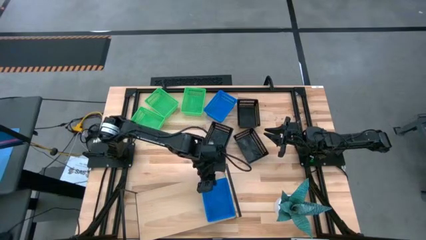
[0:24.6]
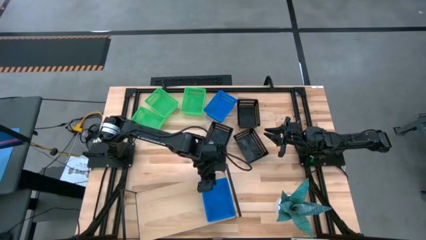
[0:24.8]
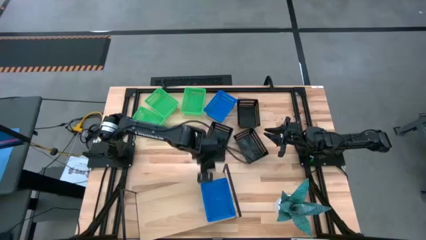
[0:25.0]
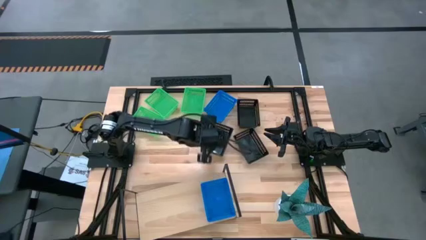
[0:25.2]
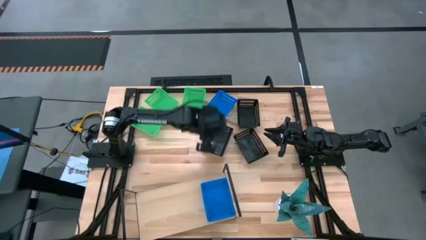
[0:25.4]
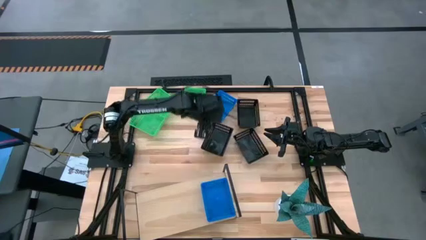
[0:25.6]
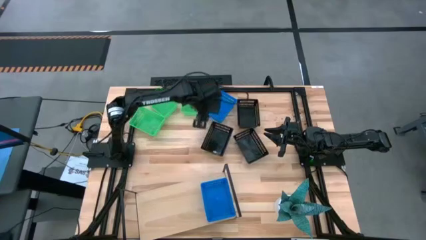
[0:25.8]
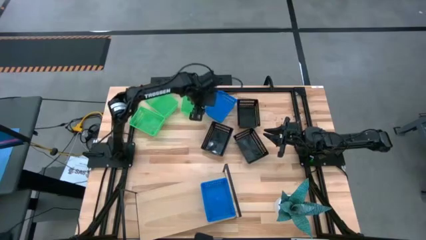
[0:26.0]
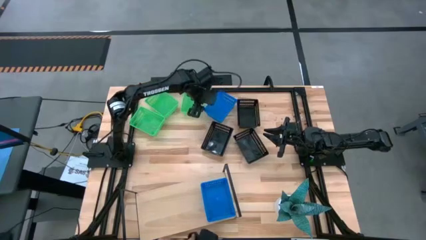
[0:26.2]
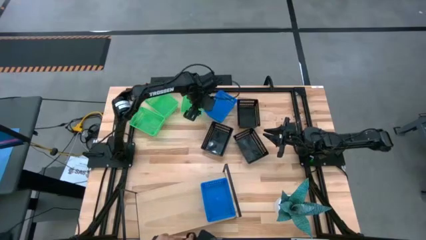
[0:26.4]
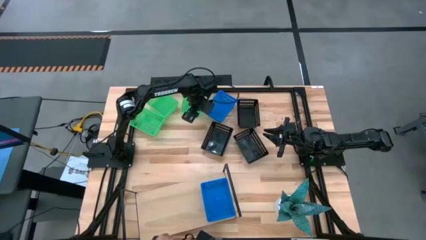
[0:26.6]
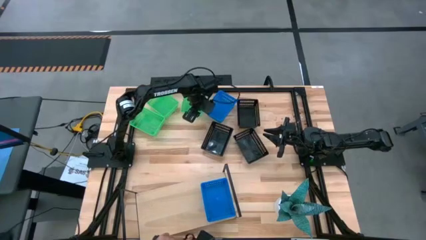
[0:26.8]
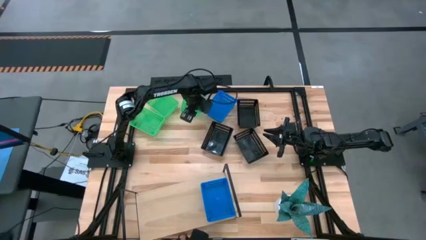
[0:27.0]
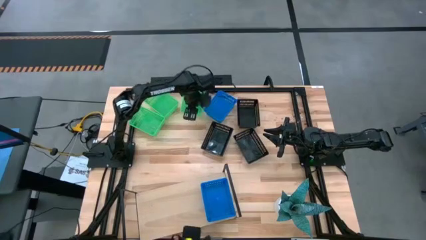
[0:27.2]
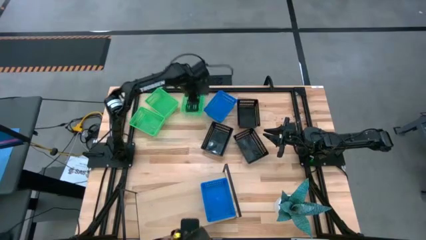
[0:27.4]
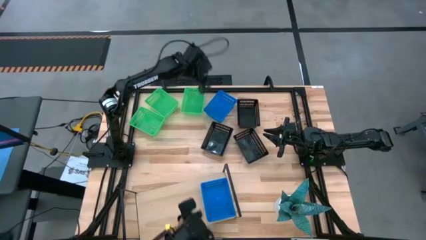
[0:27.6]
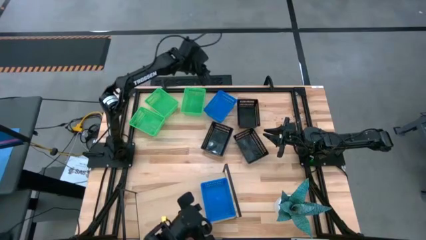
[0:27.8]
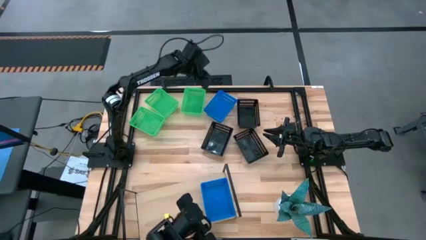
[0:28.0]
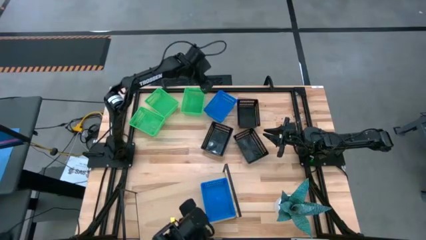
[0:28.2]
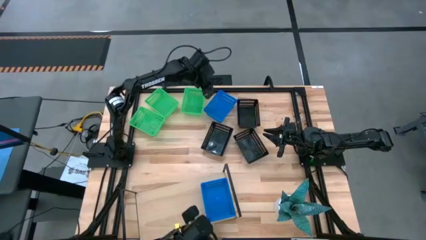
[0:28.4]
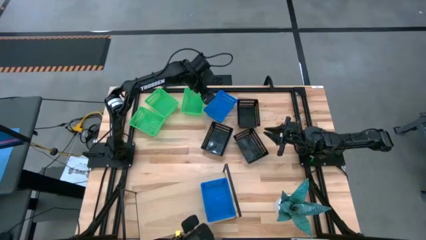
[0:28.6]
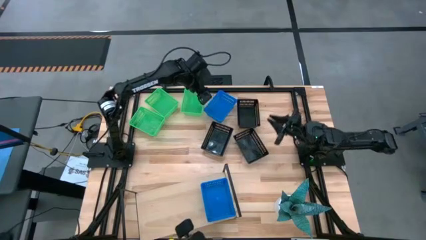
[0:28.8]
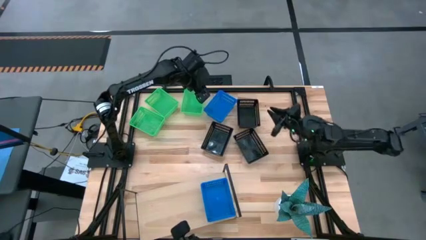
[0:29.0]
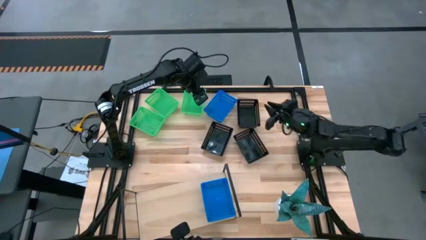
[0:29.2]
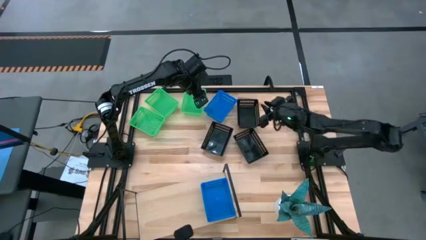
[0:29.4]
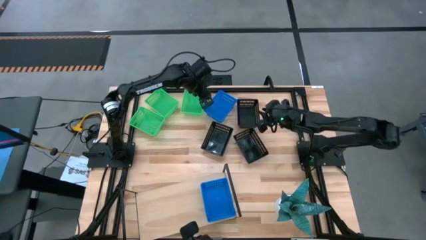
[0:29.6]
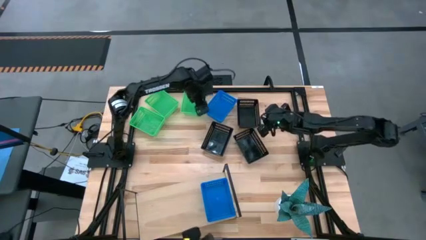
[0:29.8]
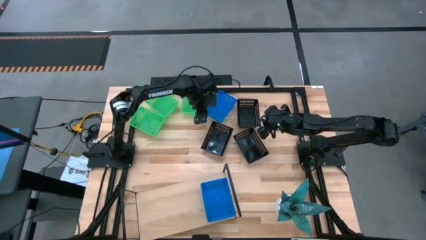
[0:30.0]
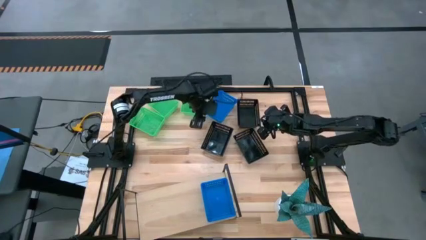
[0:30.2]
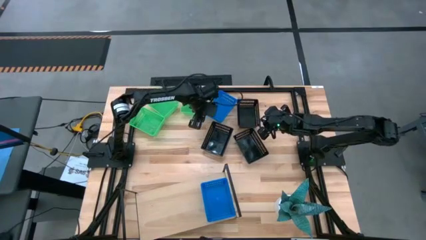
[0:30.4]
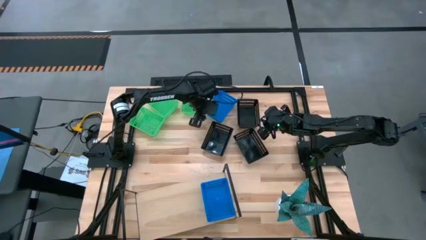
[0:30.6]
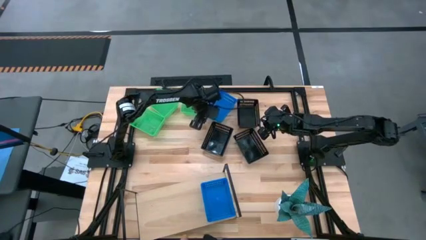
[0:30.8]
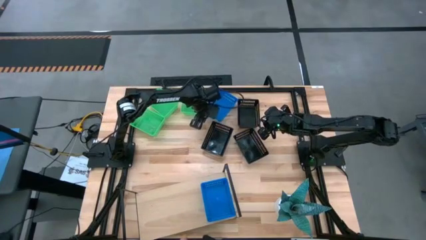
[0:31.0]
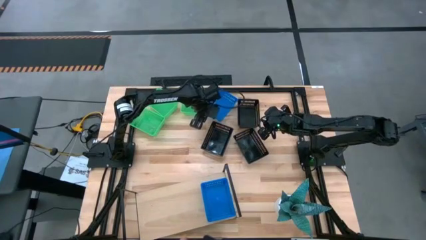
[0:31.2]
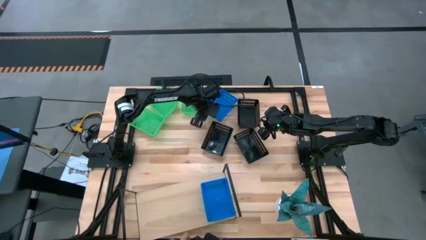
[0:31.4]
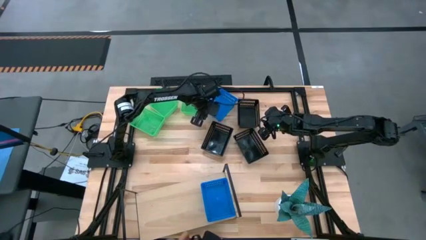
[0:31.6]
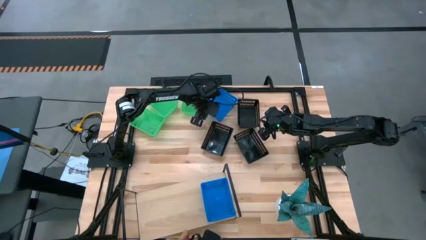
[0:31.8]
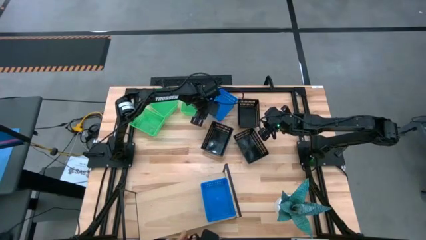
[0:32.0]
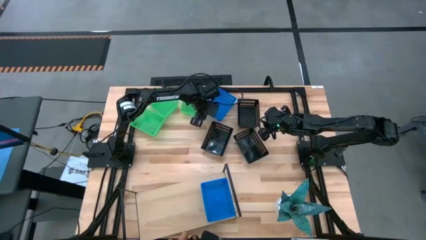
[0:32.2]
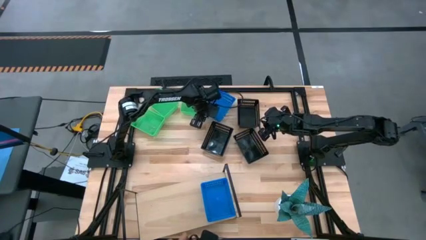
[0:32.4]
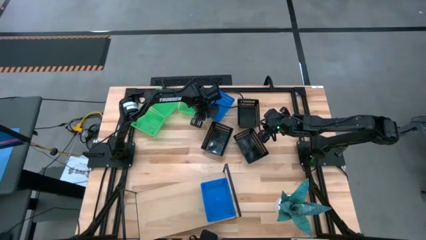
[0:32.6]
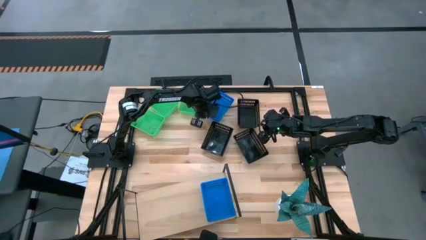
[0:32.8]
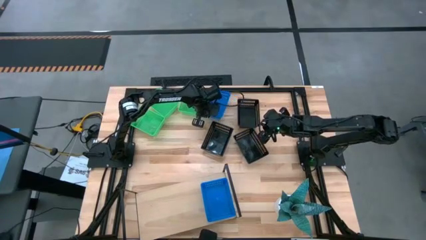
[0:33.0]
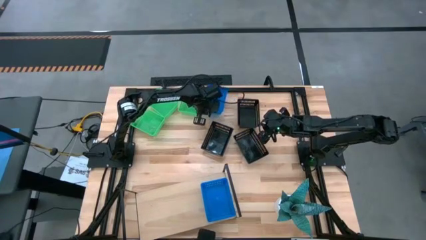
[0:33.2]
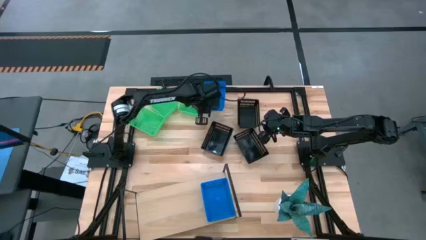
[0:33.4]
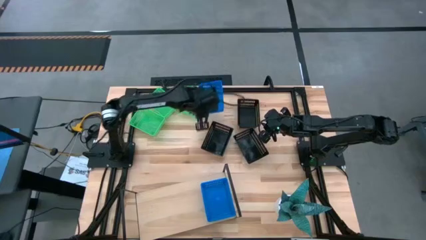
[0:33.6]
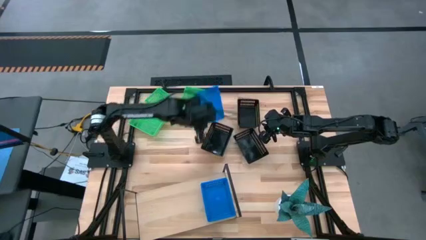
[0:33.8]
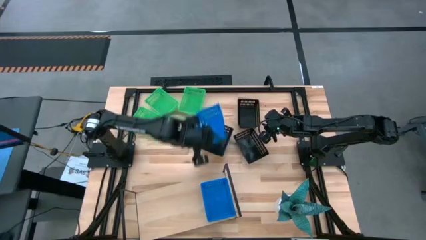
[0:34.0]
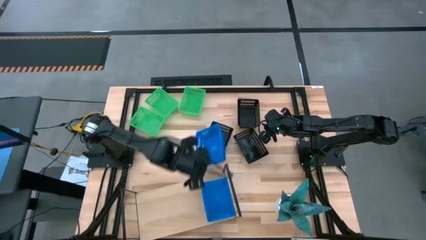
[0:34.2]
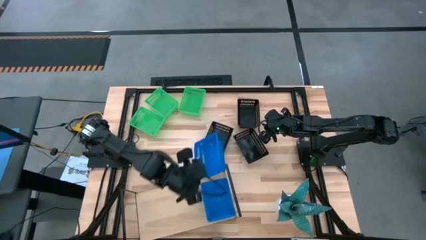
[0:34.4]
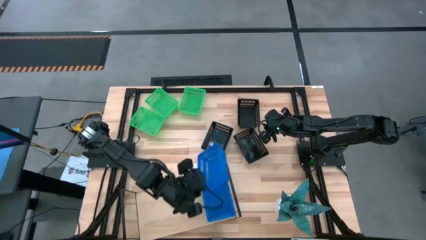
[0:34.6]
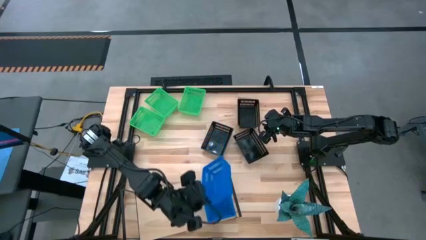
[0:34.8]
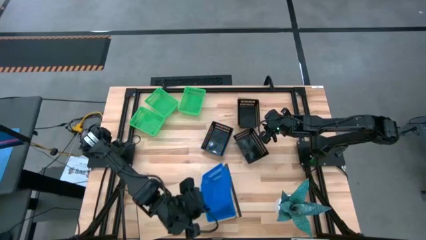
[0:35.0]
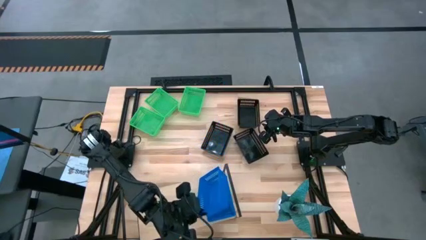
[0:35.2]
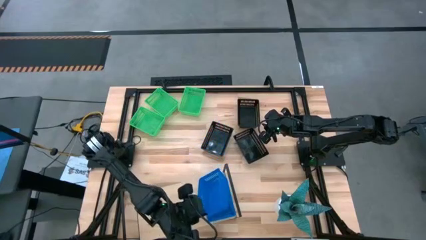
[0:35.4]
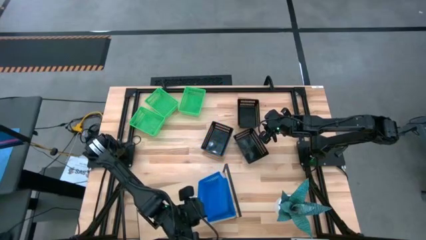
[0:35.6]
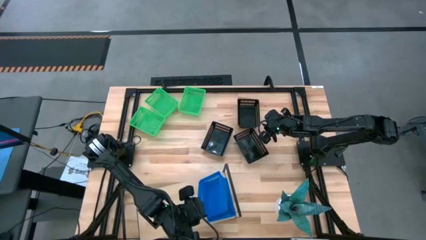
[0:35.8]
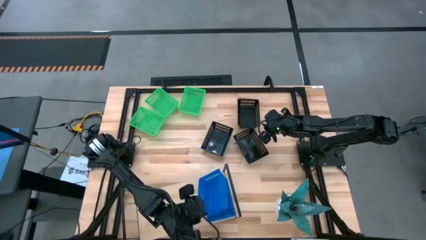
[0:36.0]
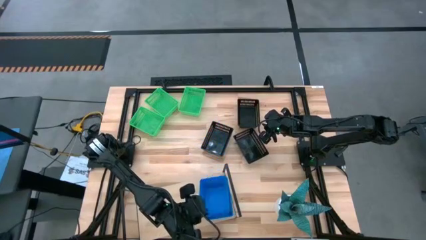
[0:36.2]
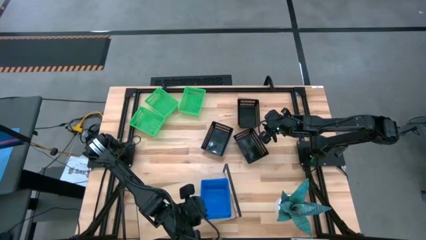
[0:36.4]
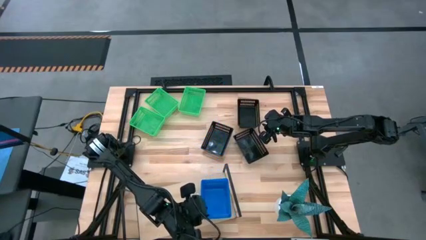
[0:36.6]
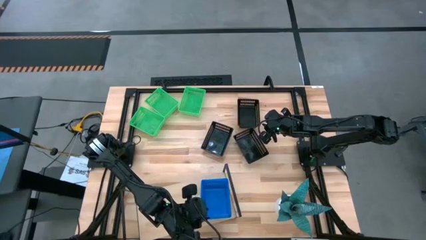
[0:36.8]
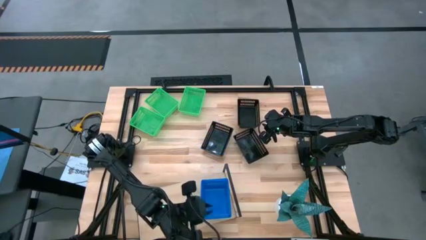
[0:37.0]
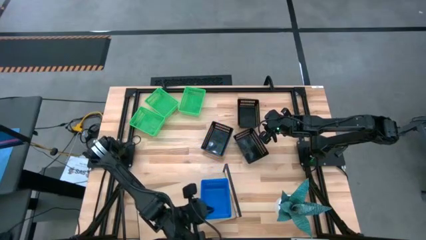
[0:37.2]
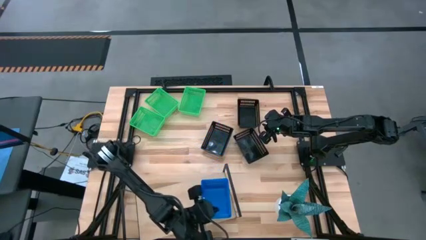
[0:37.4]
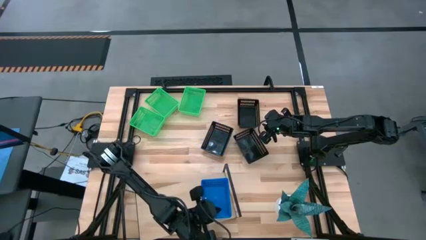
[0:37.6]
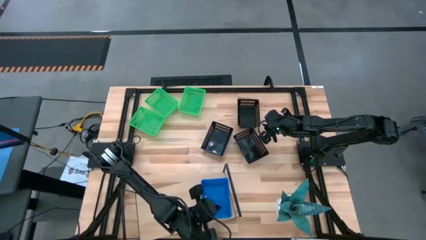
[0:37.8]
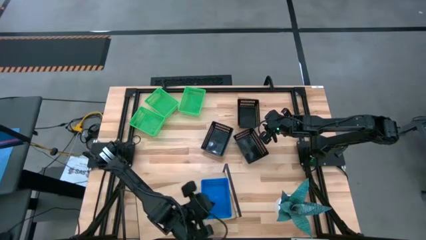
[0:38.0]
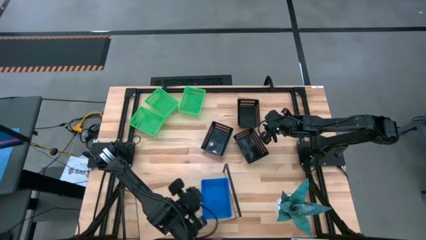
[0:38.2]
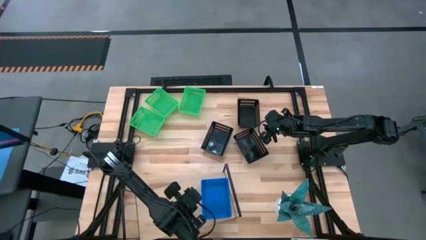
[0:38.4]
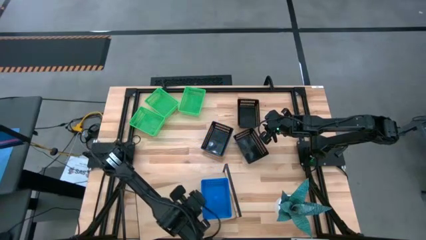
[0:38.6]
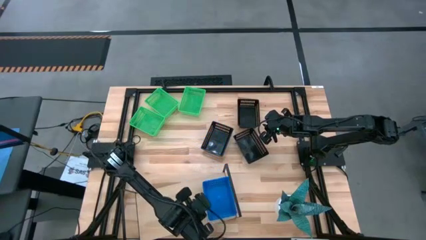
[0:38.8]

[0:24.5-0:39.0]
Task: Stack baskets on shelf by color
Stack the blue basket on top of the stacked blue basket

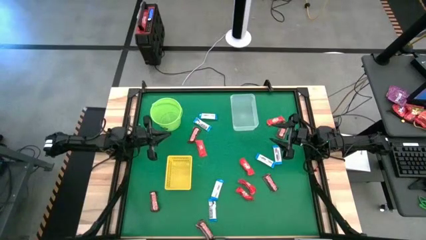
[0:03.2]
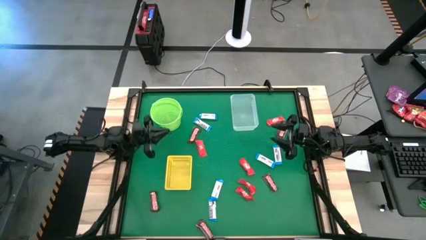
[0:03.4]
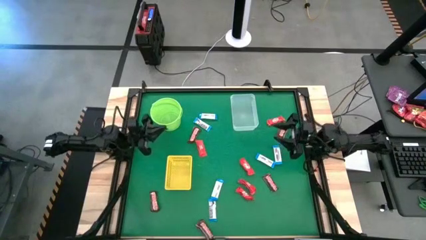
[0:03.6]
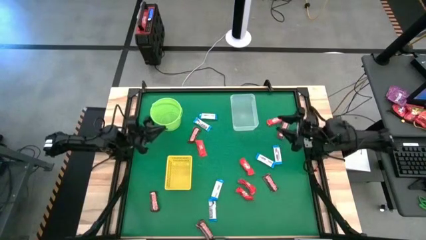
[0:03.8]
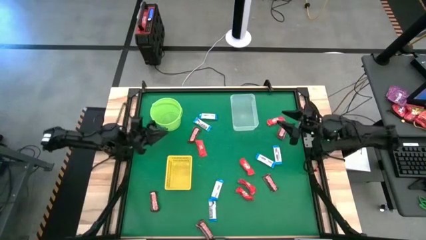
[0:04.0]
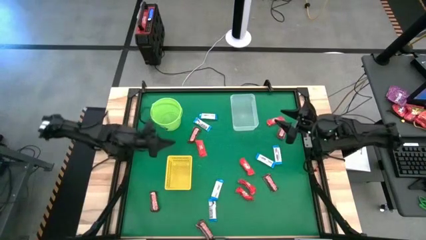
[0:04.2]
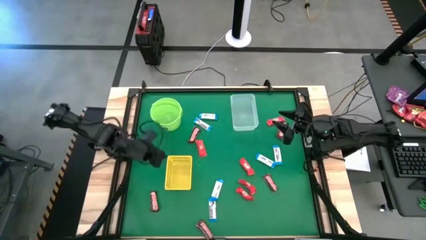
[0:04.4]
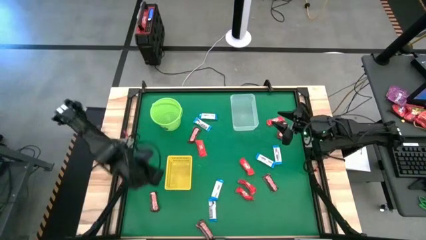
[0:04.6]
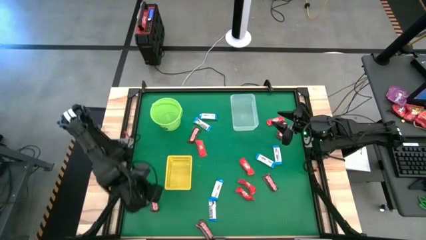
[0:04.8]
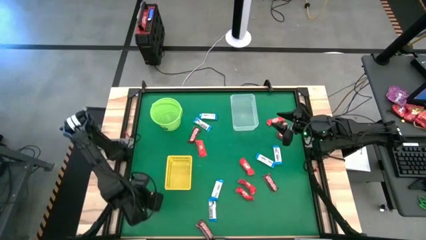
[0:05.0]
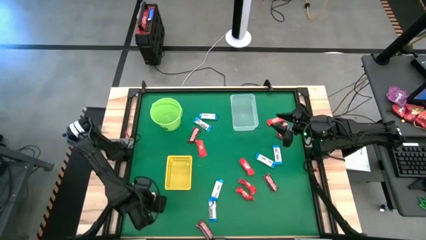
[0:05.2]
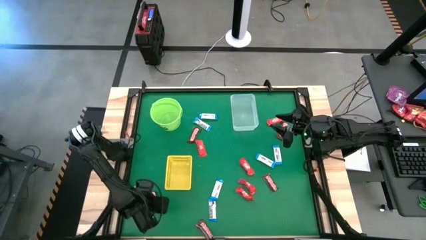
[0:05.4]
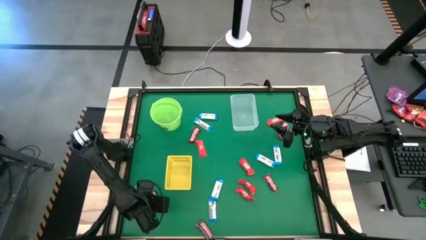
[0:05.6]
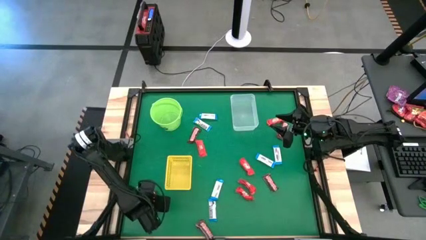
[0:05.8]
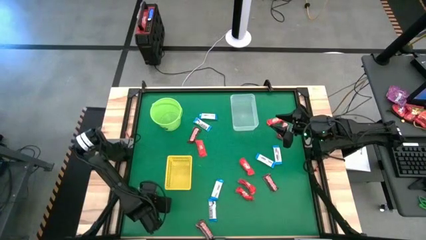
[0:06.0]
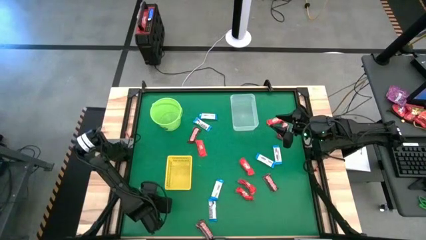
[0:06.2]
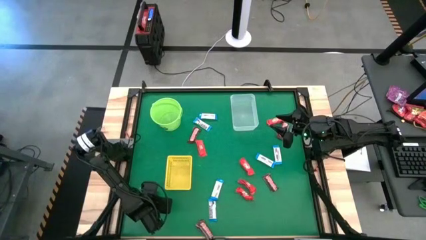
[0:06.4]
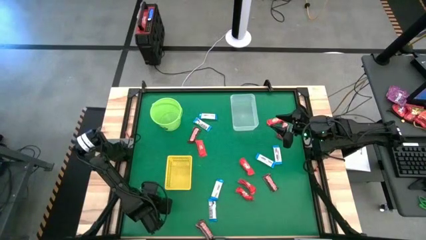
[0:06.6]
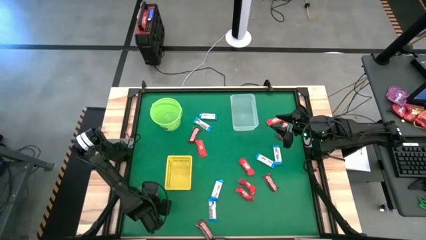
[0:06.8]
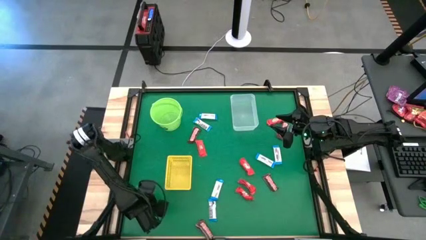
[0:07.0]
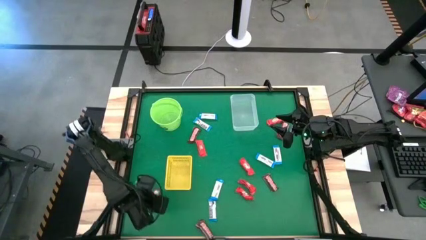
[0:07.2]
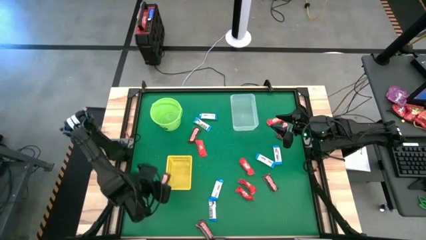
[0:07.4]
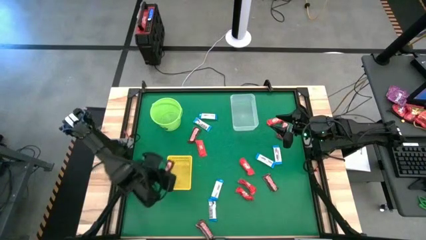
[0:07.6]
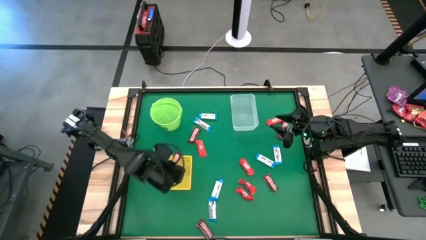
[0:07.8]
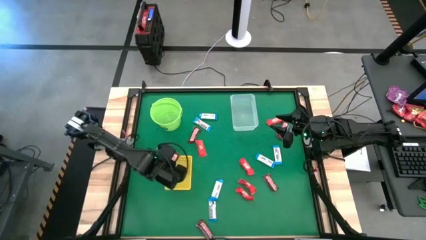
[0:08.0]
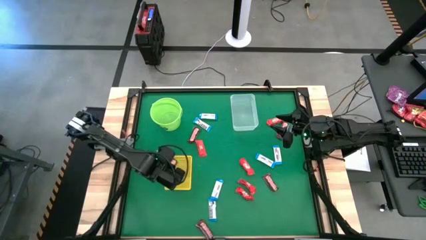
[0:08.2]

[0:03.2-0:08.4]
Task: Sort candy by brand, put in halloween buckets
Put the brown chocolate into the yellow bin
